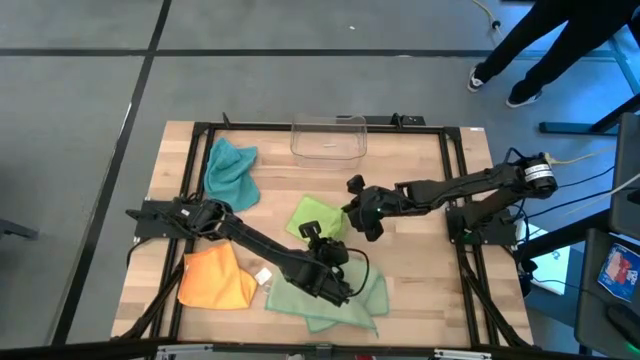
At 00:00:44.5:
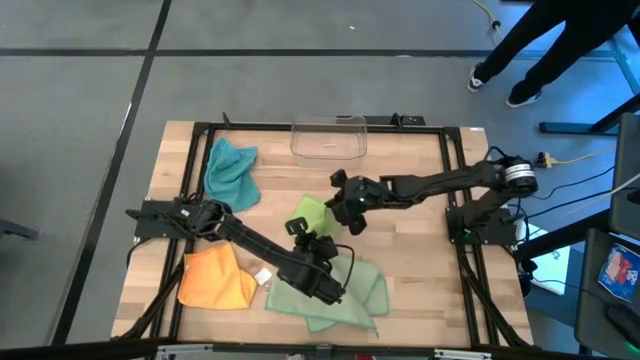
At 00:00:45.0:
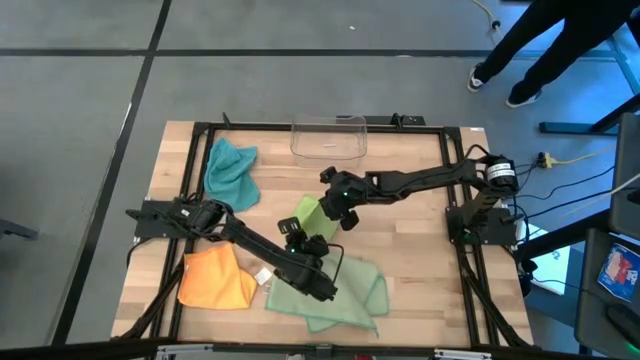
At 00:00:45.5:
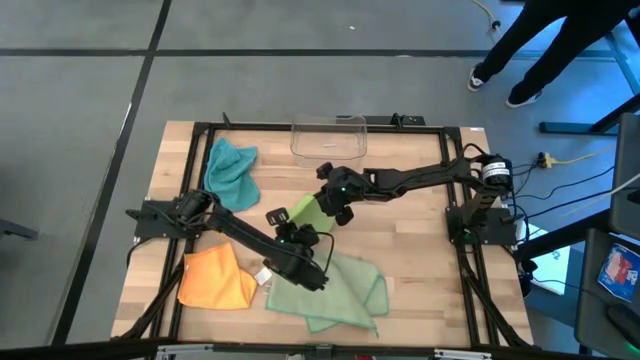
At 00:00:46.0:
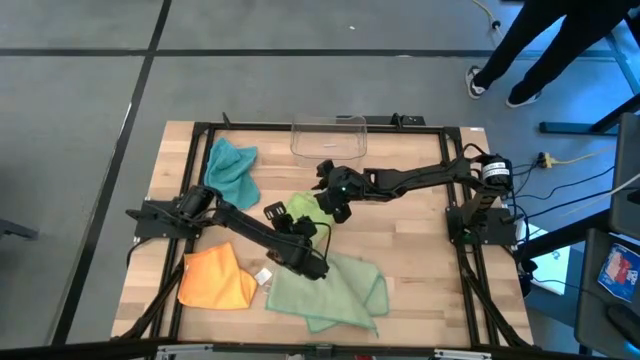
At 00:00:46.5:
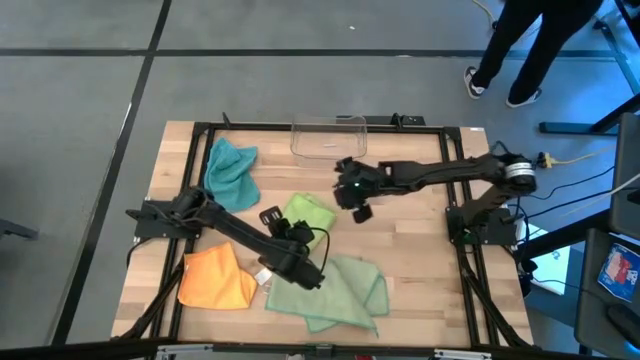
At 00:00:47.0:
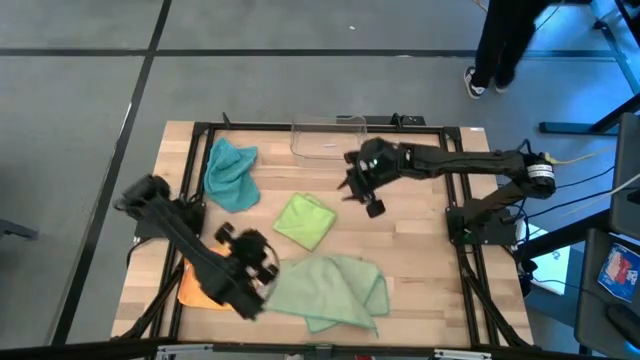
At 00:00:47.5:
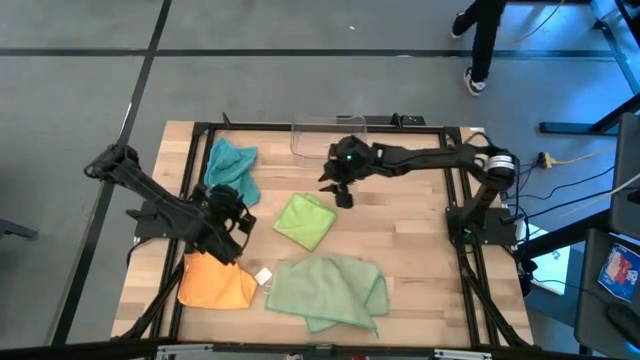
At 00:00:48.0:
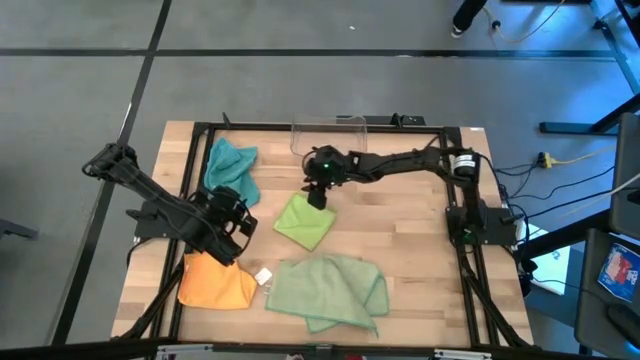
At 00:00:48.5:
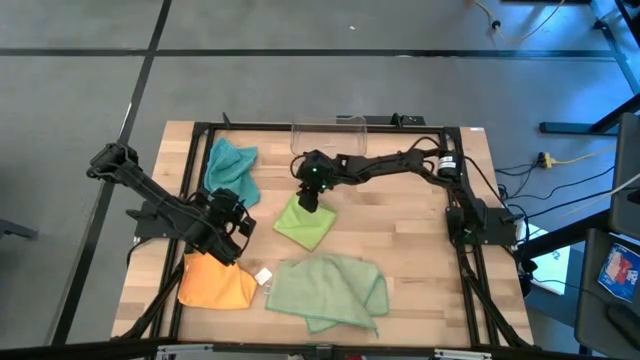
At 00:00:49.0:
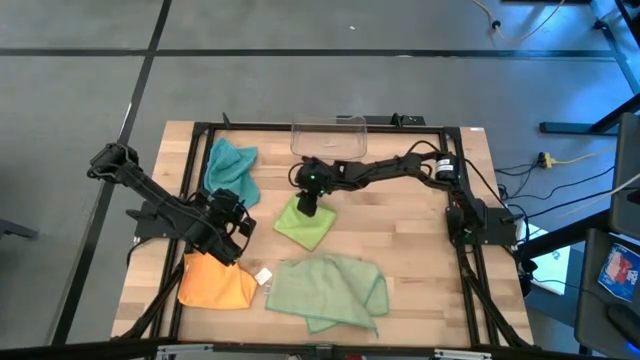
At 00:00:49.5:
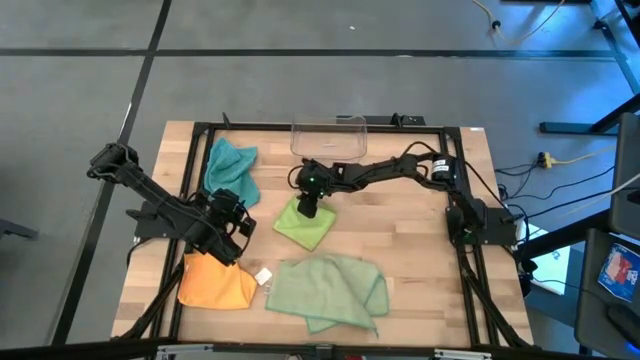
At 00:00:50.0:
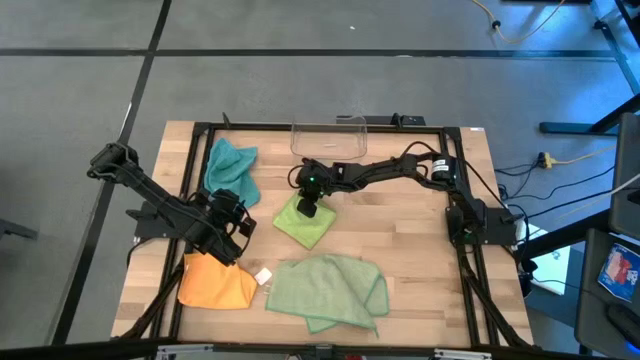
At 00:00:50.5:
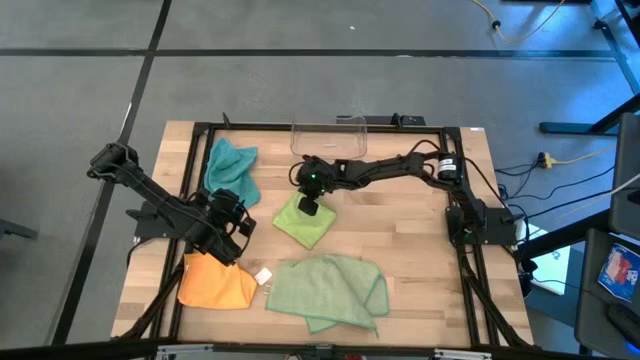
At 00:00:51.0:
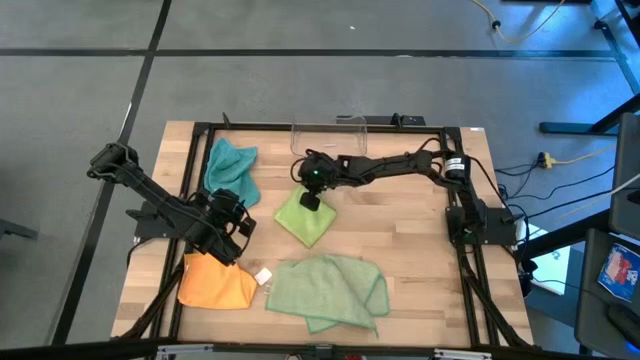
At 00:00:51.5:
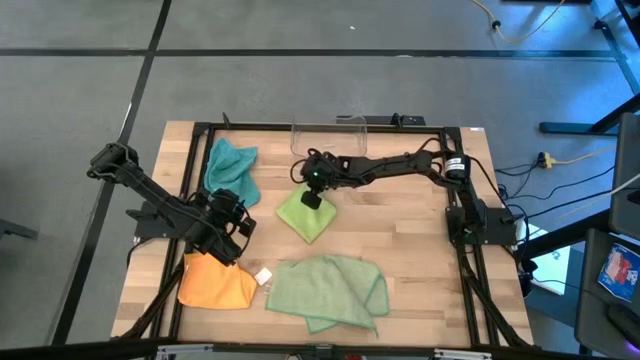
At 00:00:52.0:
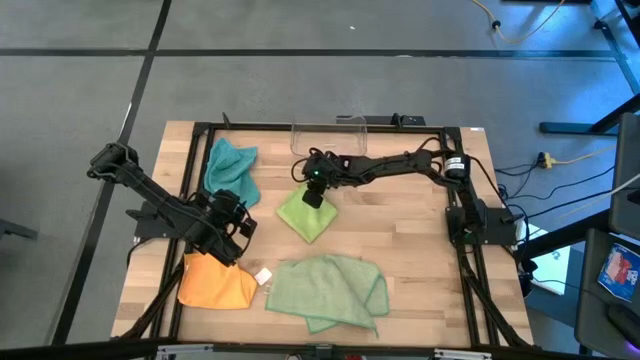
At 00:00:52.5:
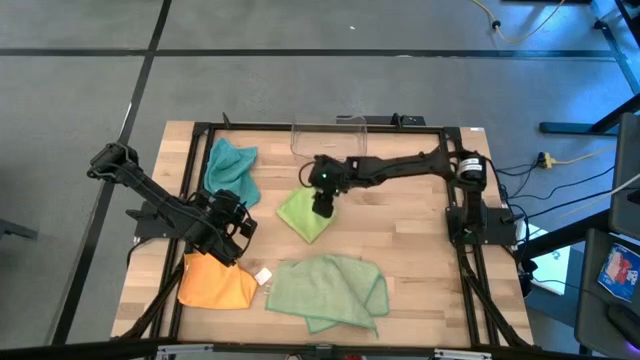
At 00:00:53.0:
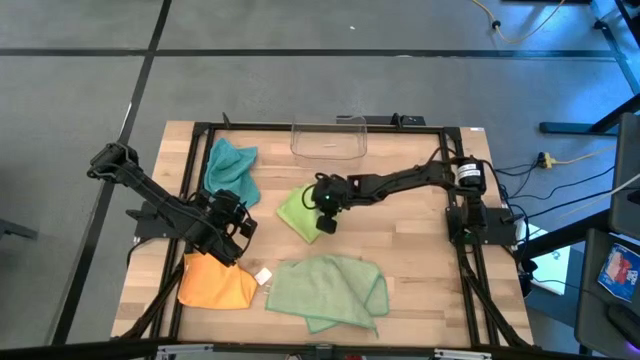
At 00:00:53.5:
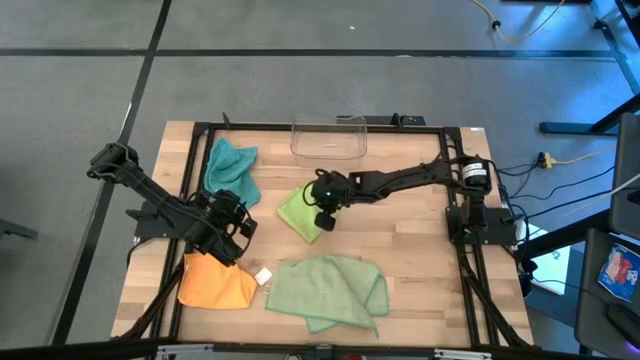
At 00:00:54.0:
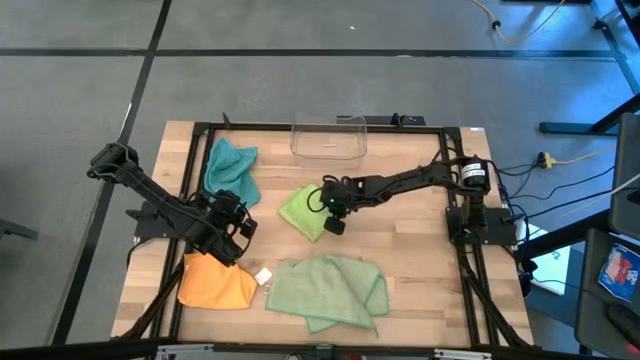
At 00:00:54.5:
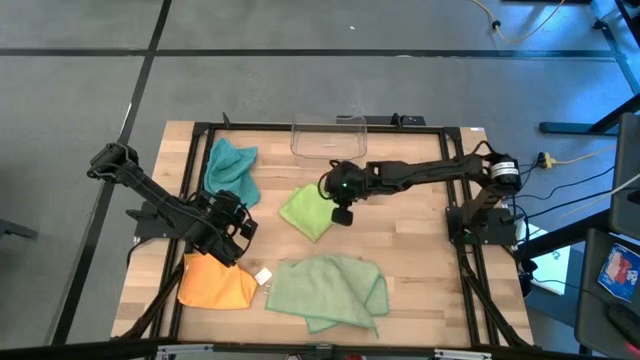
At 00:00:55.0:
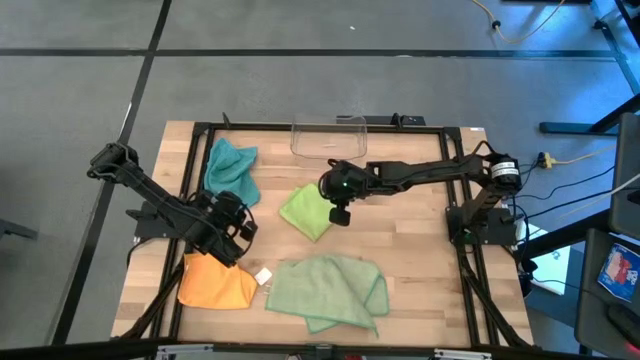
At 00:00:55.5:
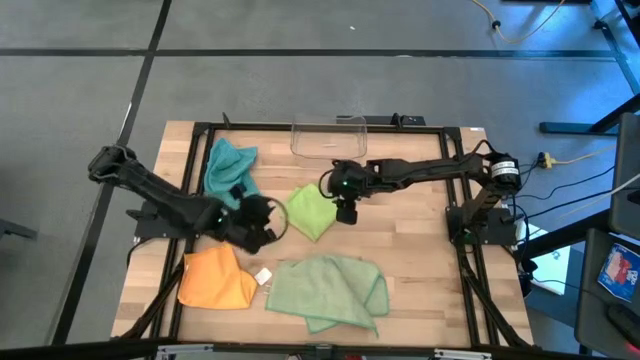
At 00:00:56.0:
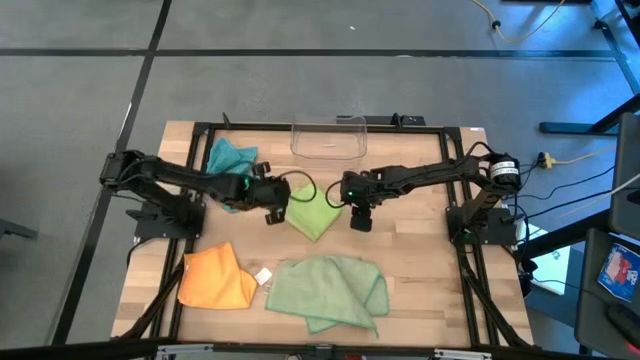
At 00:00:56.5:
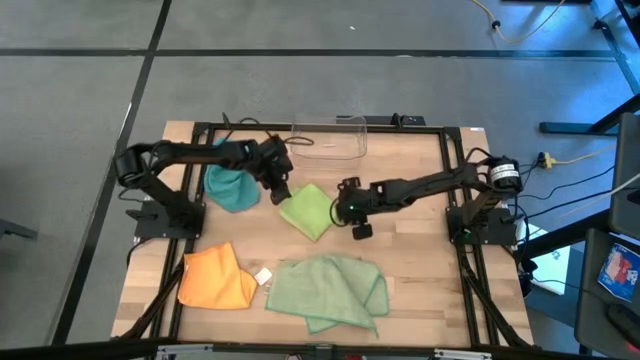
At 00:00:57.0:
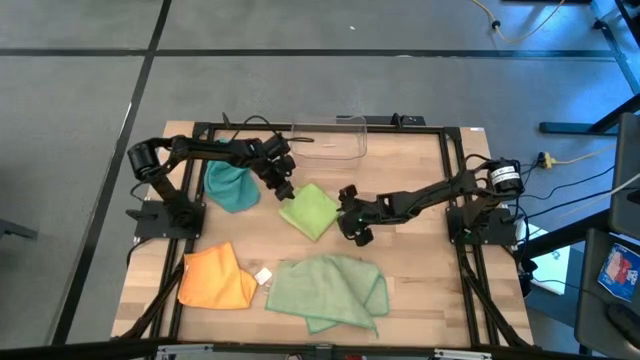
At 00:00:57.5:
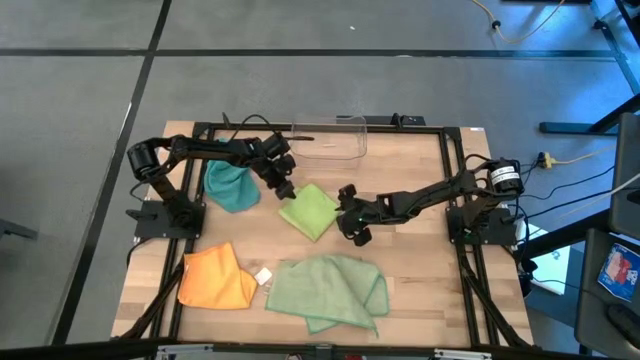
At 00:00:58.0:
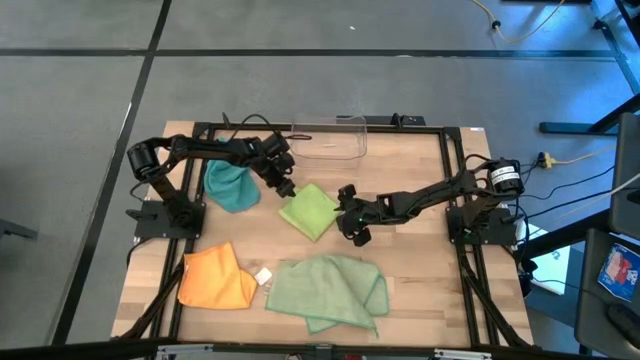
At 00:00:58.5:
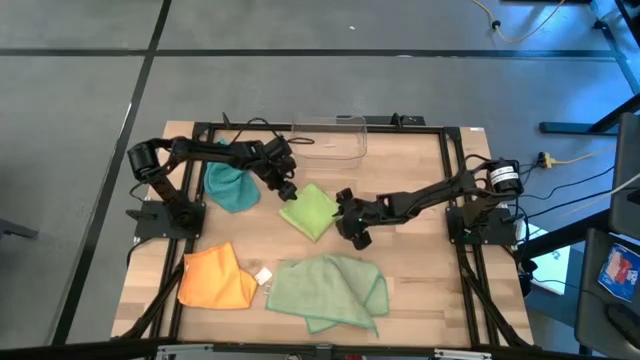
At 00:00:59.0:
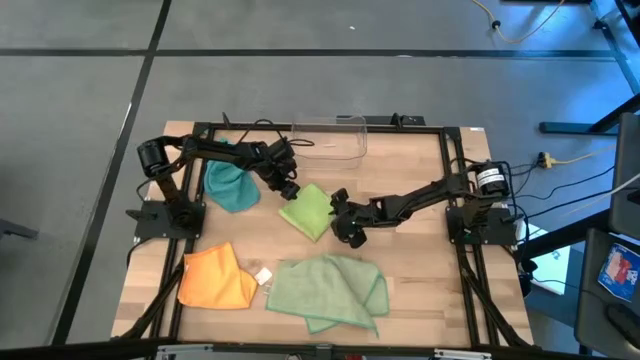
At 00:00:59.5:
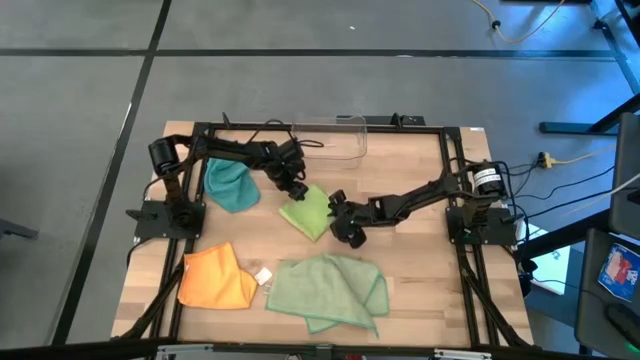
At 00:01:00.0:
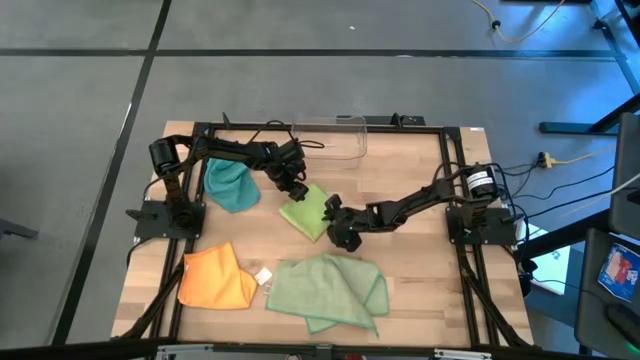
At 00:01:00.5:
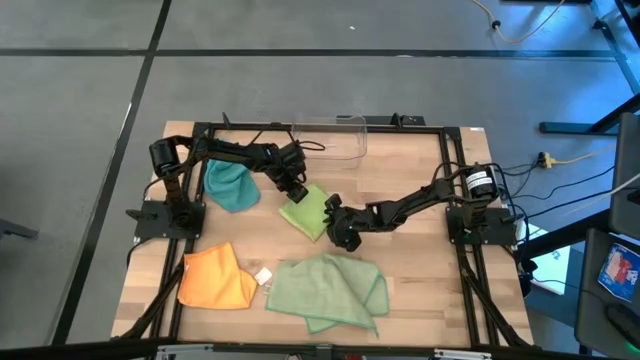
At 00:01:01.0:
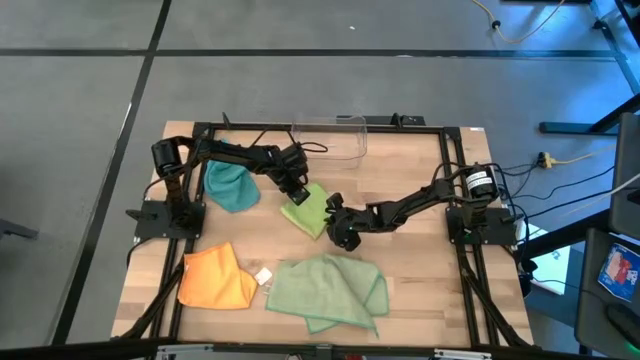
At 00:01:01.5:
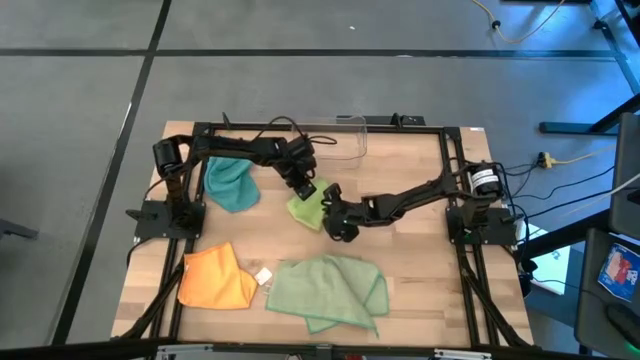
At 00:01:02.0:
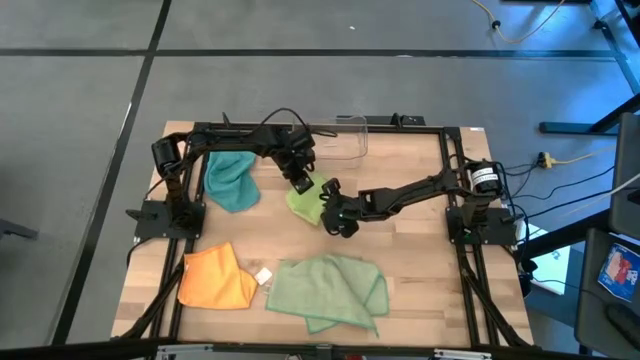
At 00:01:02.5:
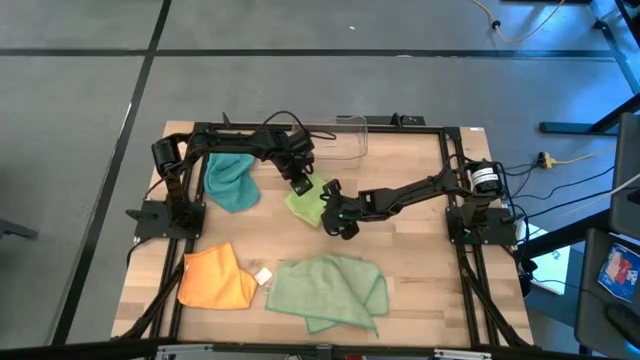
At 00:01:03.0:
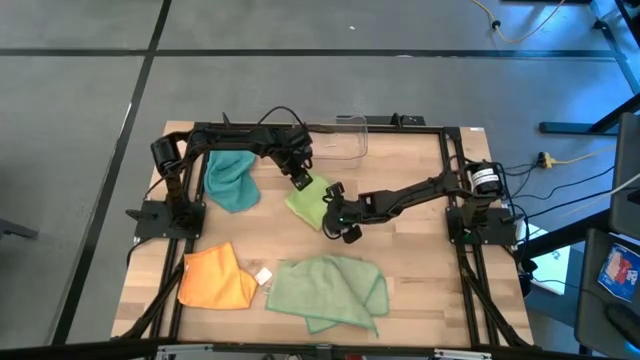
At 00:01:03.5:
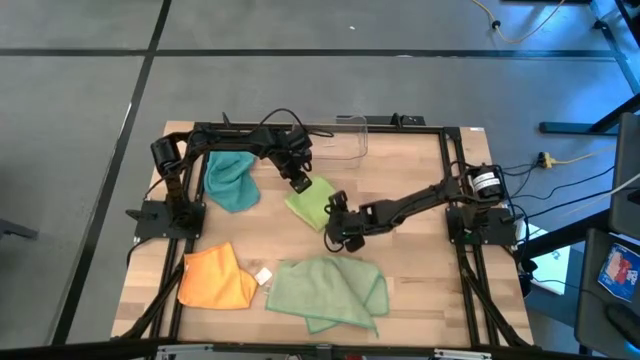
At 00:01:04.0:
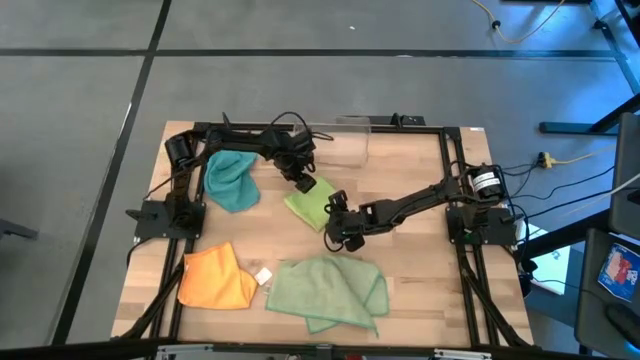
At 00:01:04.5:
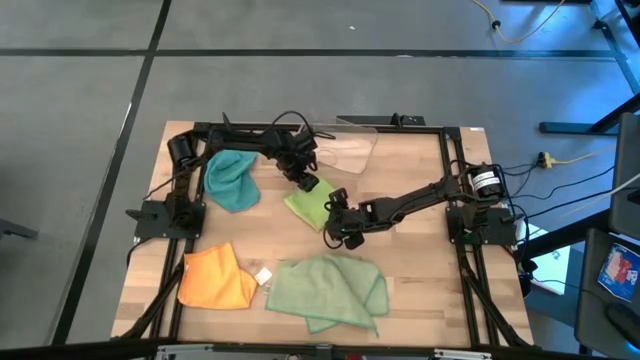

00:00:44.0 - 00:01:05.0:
Task: Fold microfiber towels
Fold the light green microfiber towel
